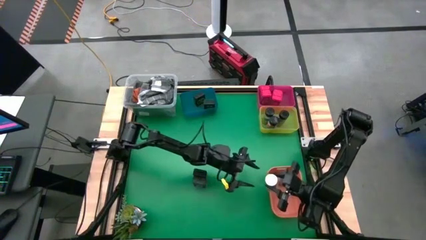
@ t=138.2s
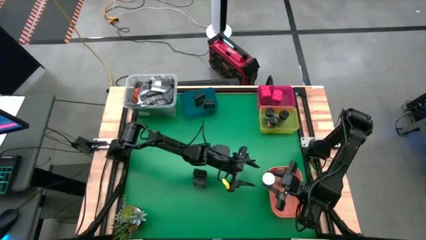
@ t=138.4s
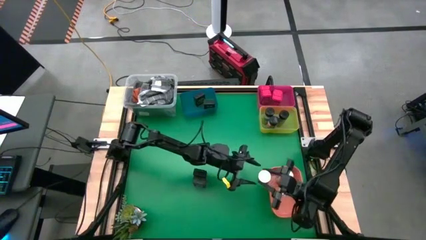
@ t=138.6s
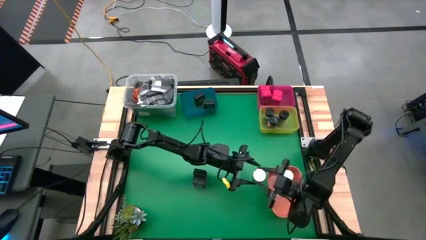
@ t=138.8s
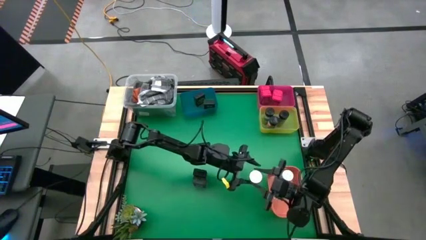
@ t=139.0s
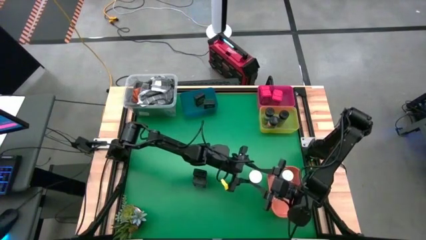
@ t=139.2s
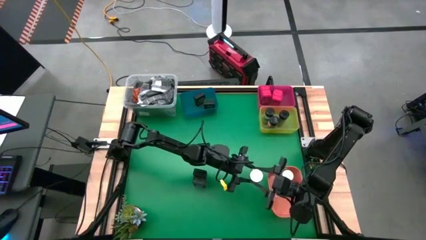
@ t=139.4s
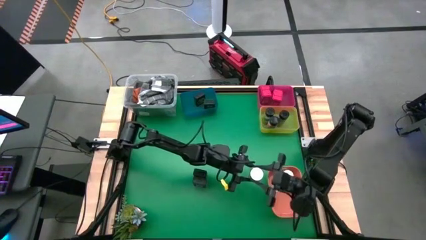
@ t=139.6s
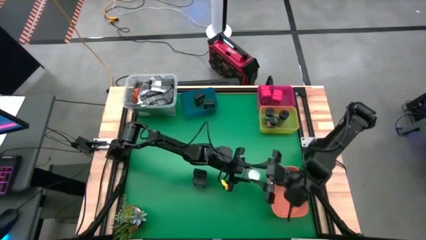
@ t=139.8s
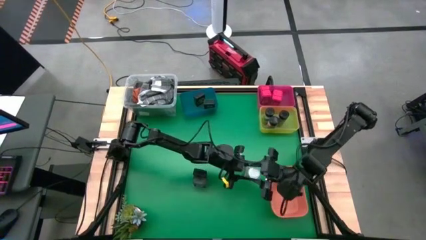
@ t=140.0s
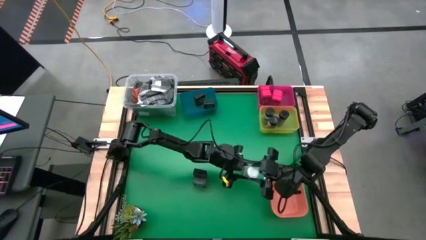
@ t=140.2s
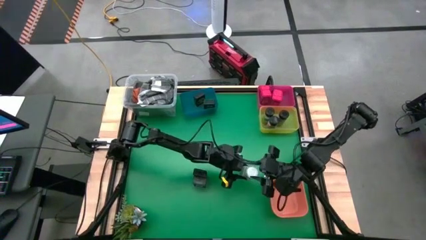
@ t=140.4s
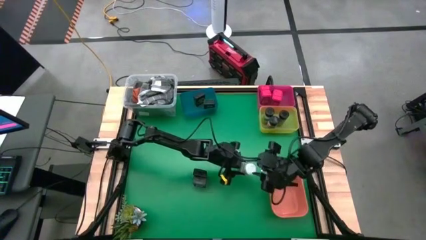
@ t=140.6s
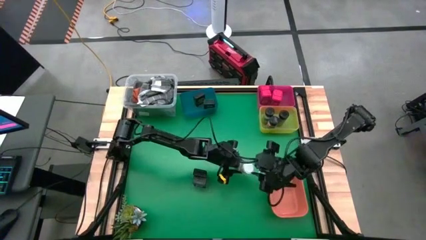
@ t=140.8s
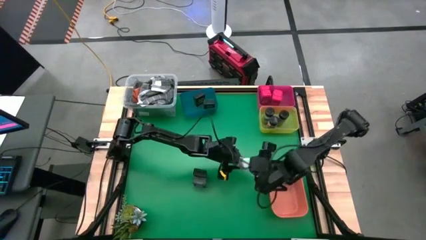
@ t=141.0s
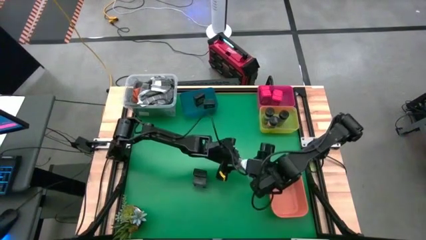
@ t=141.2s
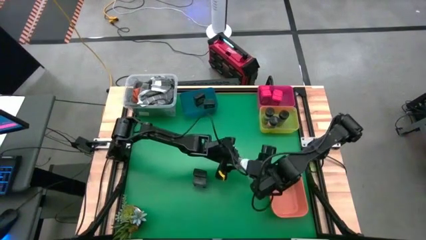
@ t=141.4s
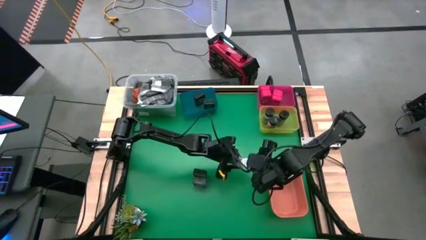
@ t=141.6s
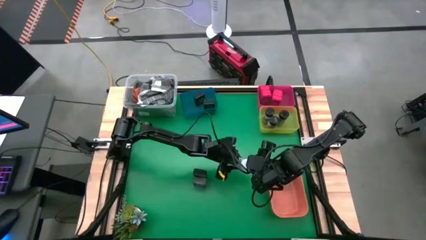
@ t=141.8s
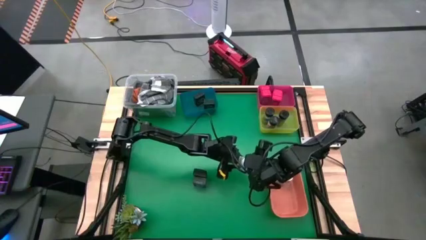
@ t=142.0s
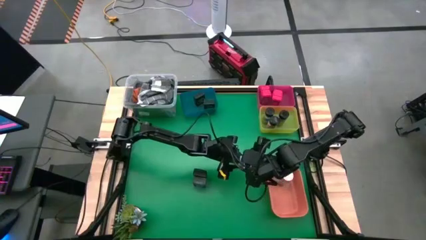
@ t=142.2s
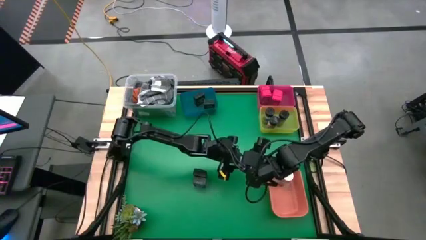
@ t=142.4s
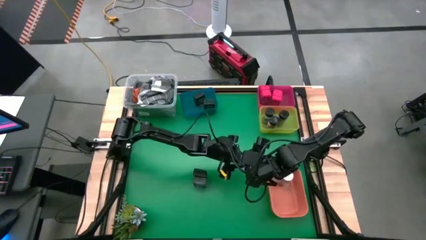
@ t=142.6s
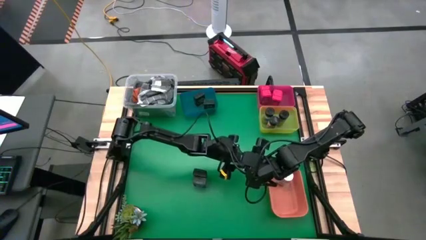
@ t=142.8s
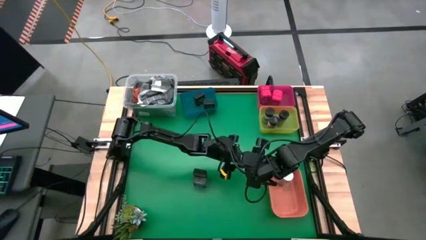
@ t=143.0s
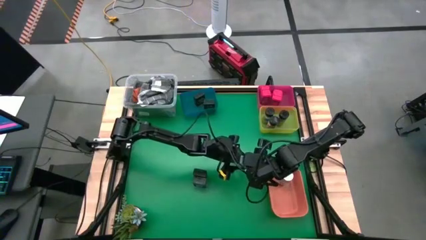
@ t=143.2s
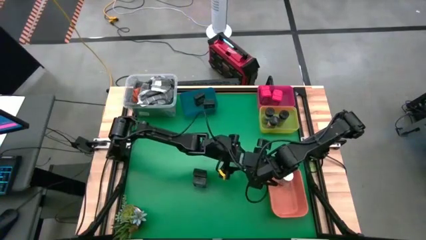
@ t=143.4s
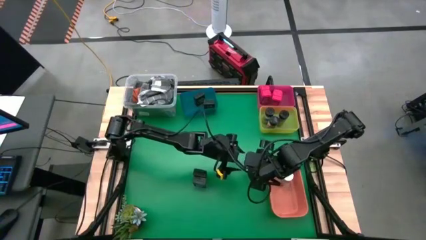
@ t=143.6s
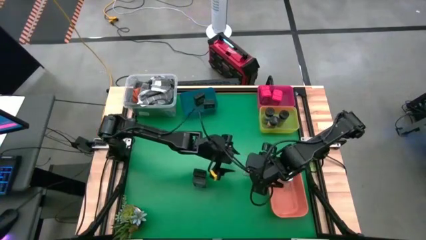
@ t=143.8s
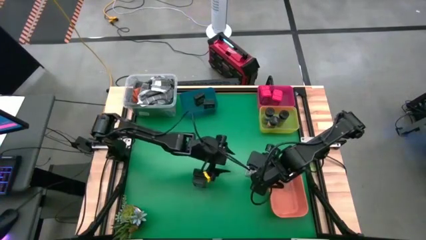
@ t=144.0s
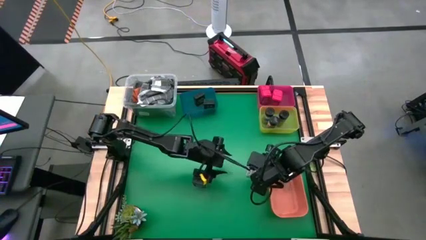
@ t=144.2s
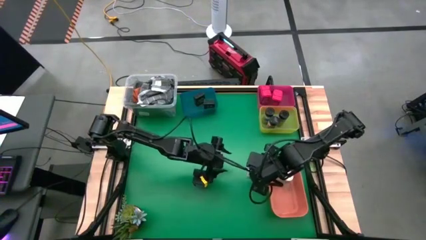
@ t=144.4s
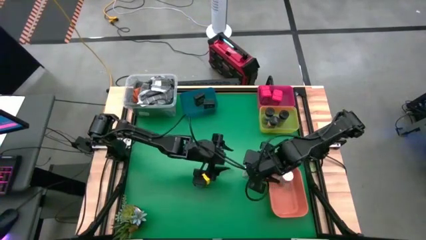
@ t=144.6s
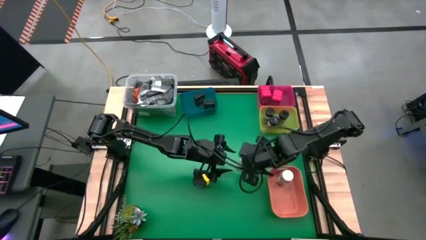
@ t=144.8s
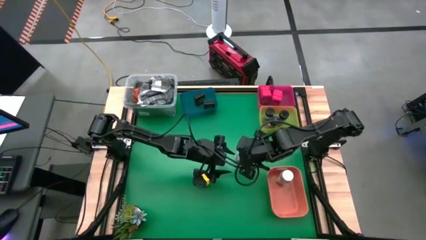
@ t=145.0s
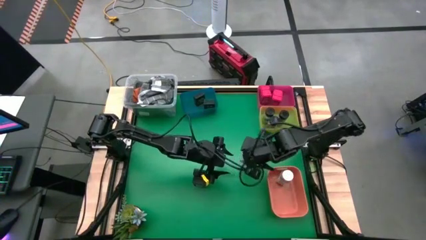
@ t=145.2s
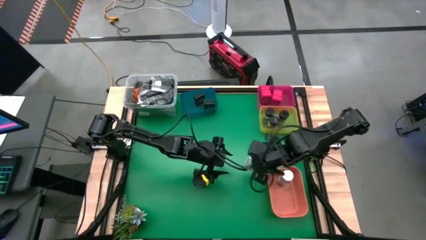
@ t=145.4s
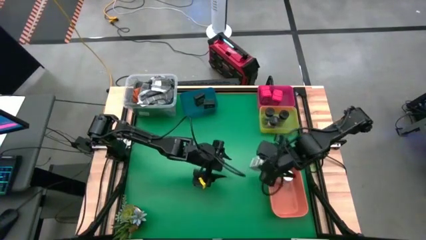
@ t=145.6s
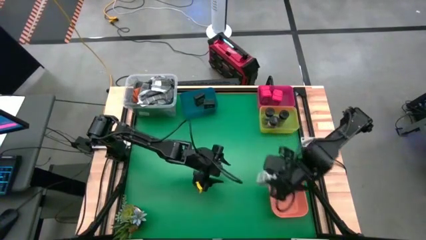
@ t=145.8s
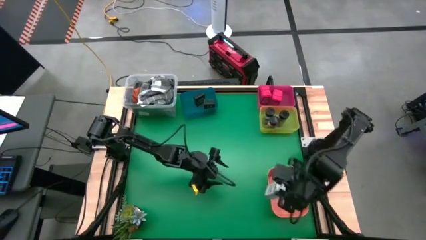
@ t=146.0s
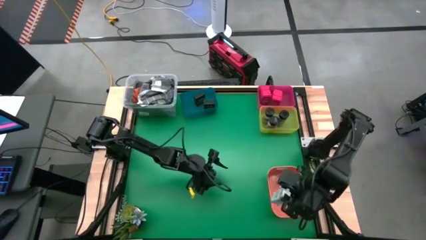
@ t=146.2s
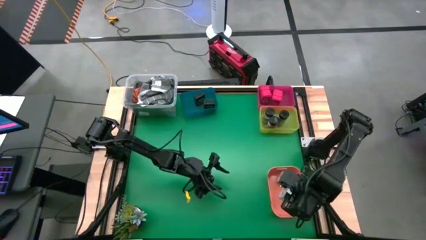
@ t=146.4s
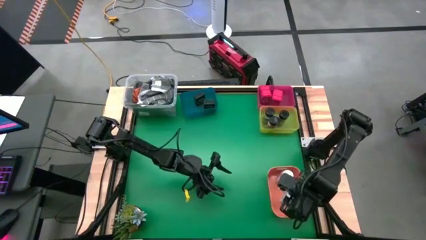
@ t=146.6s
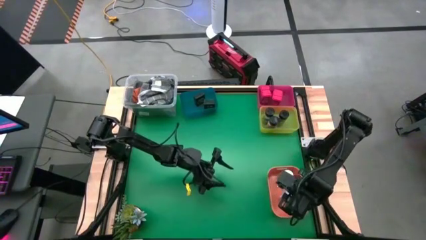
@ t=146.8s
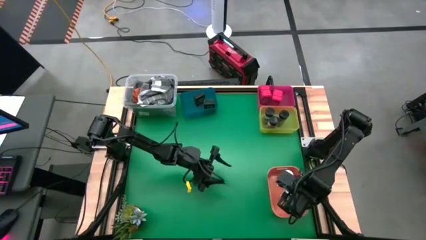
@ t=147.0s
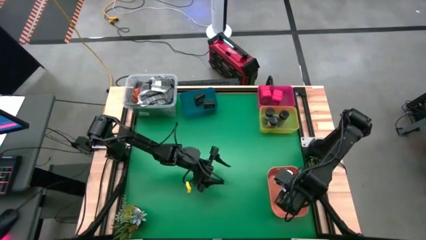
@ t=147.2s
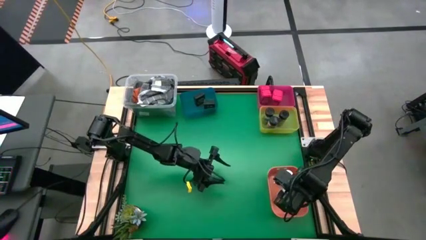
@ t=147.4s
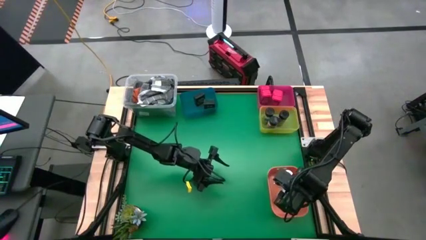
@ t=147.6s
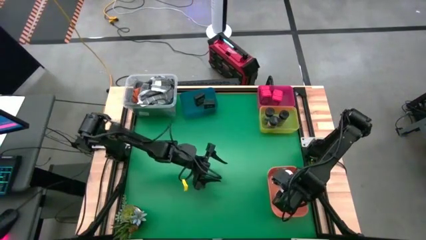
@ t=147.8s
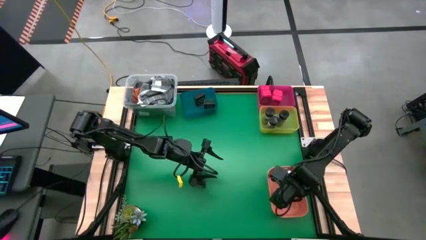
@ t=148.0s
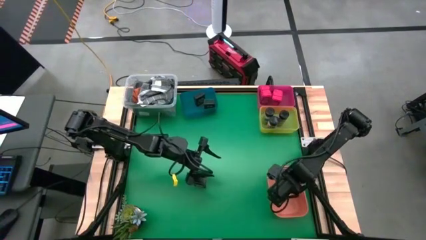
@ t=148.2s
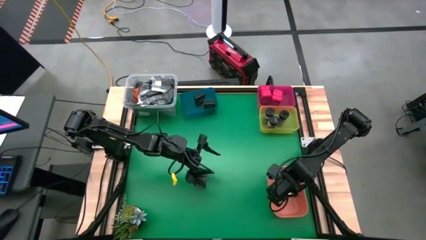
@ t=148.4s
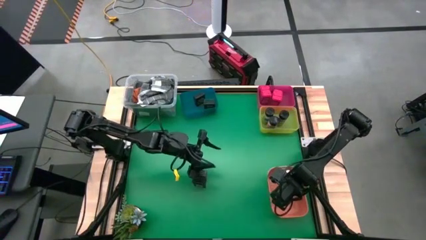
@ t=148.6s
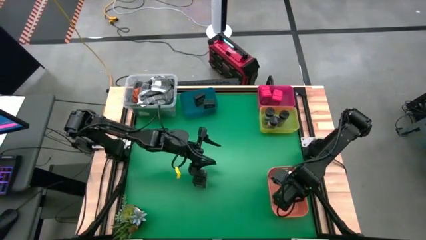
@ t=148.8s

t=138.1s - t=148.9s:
Task: Sort spices by type
Put the white seasoning from the middle into the orange bin
